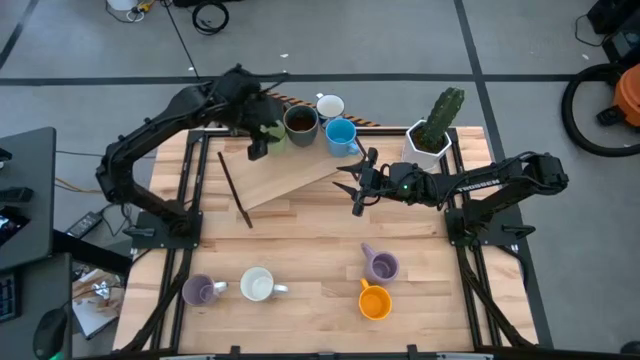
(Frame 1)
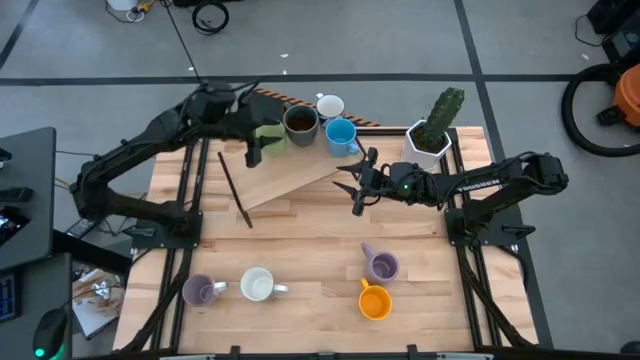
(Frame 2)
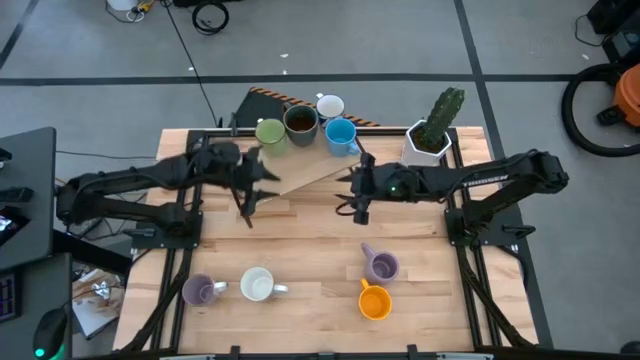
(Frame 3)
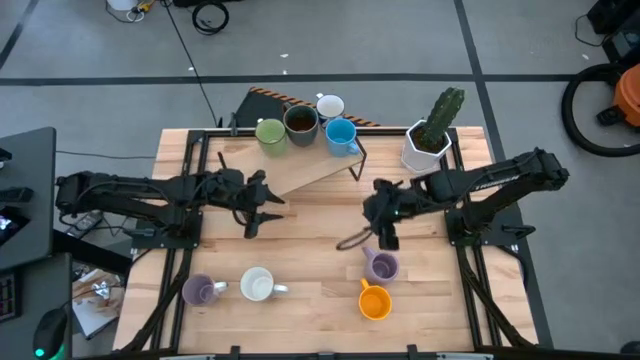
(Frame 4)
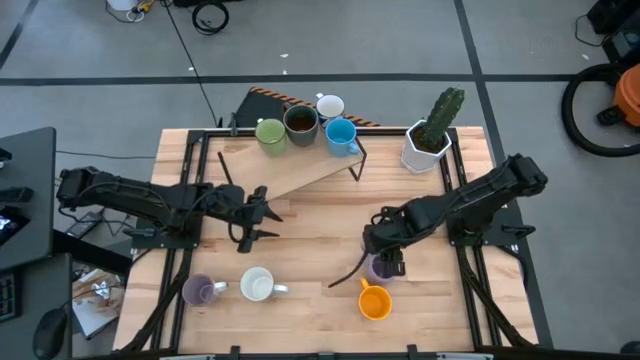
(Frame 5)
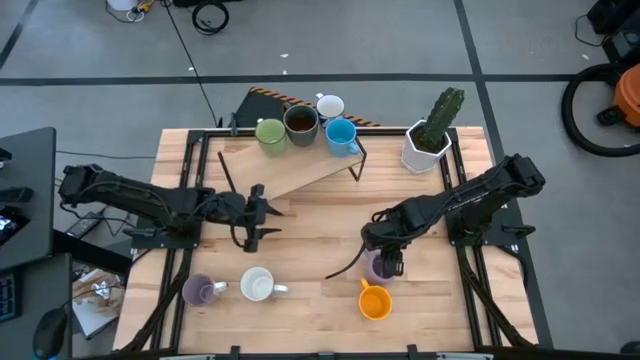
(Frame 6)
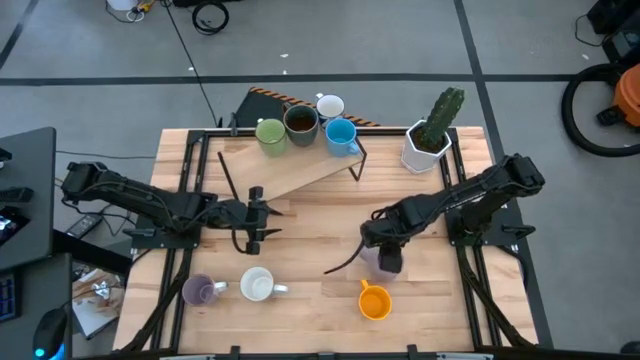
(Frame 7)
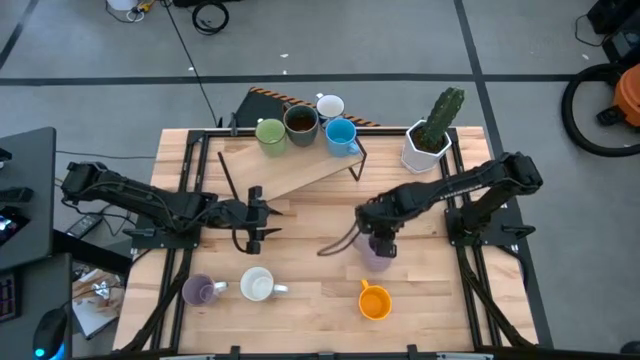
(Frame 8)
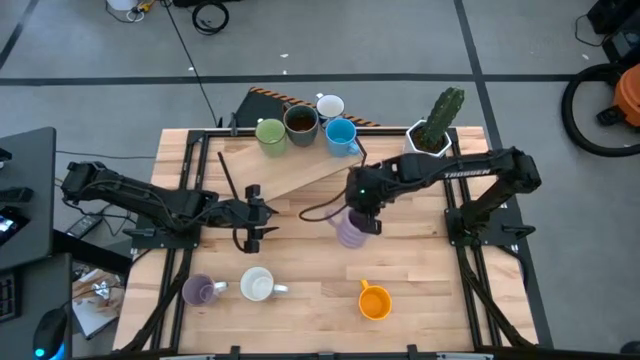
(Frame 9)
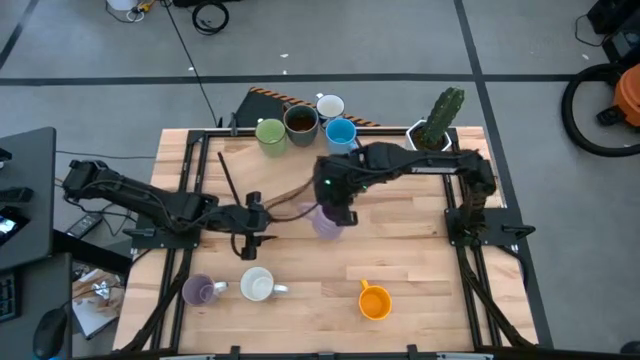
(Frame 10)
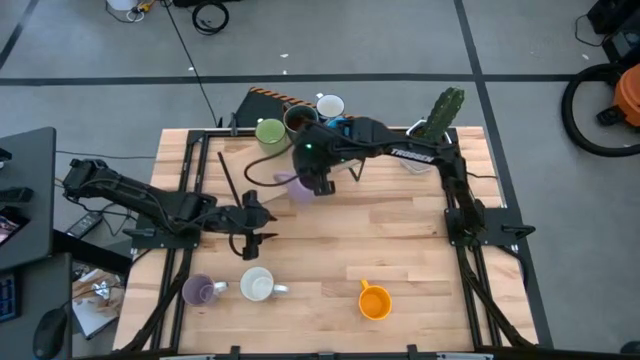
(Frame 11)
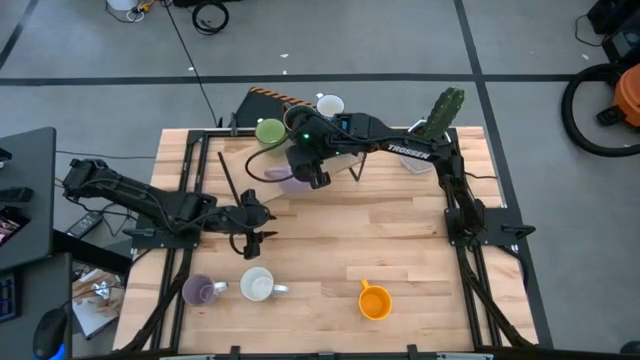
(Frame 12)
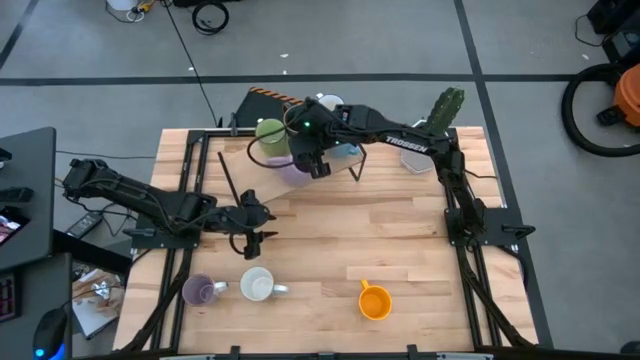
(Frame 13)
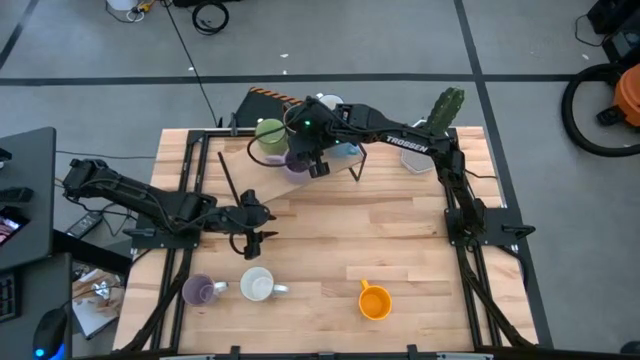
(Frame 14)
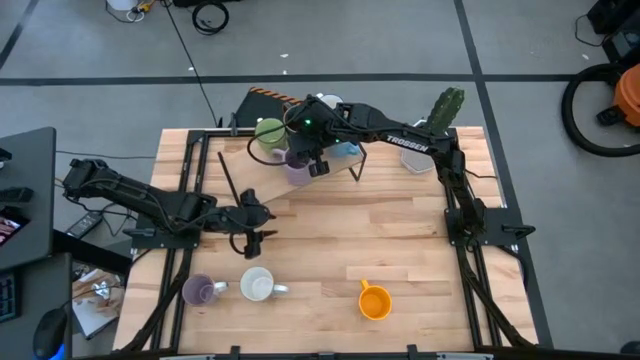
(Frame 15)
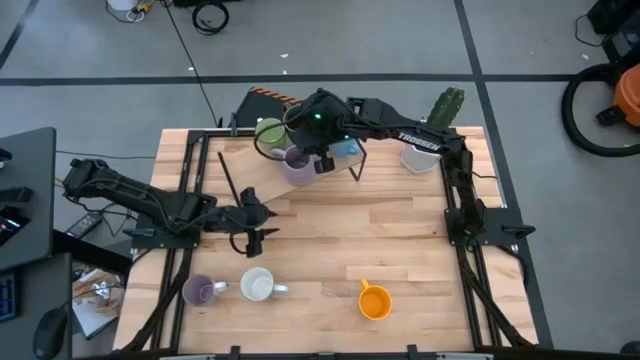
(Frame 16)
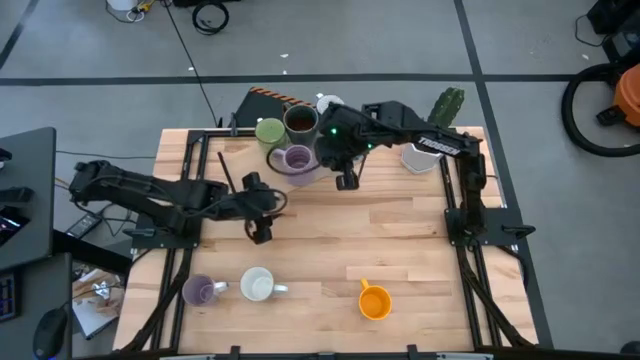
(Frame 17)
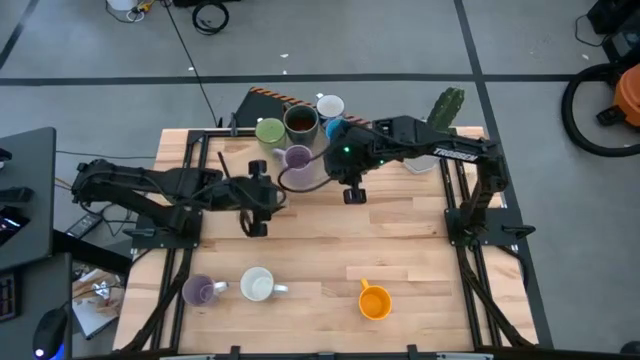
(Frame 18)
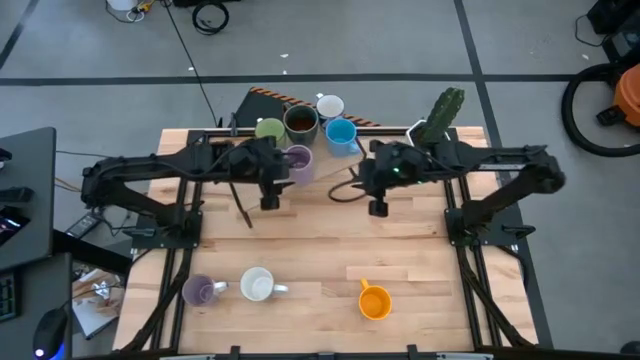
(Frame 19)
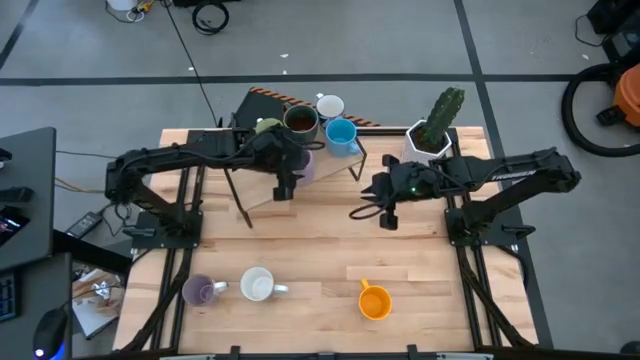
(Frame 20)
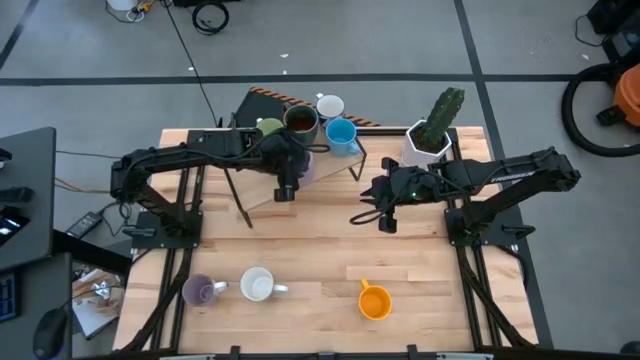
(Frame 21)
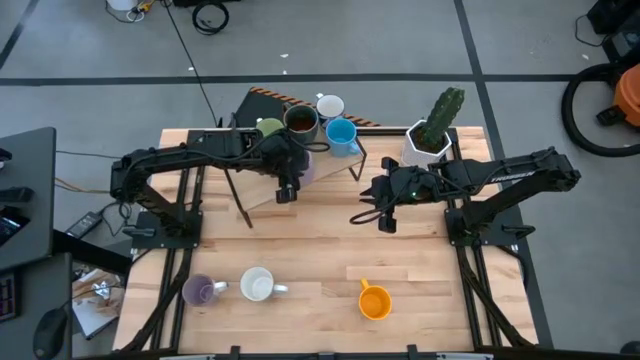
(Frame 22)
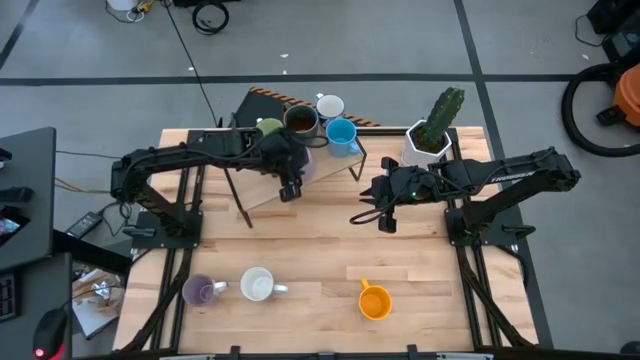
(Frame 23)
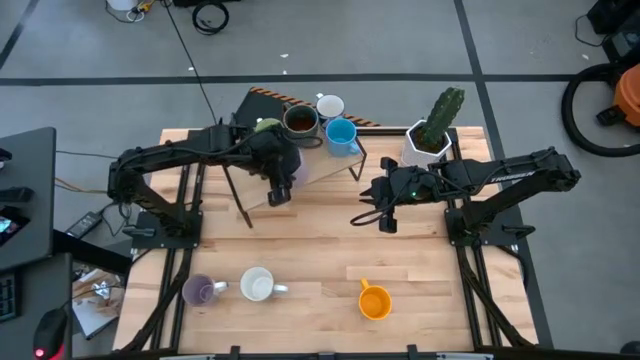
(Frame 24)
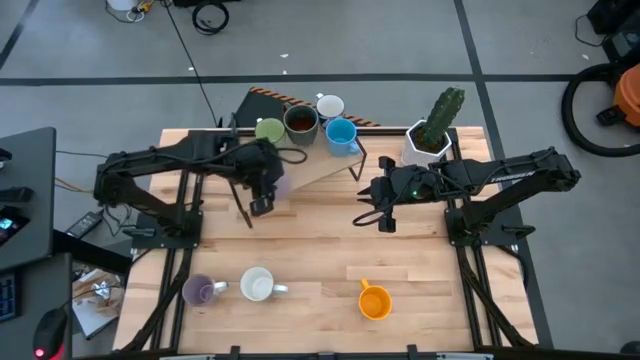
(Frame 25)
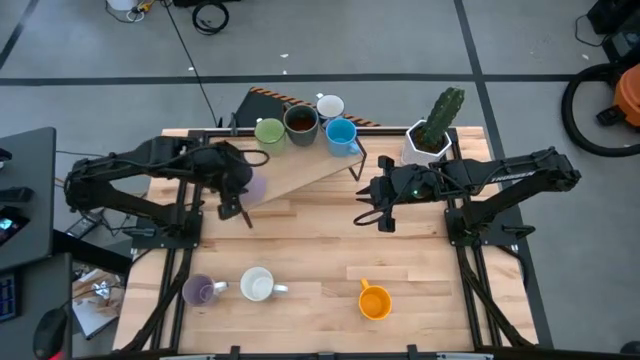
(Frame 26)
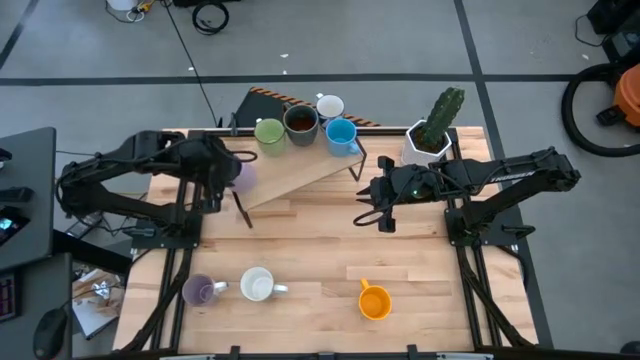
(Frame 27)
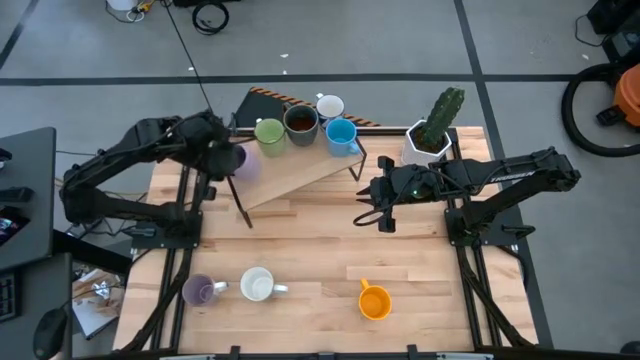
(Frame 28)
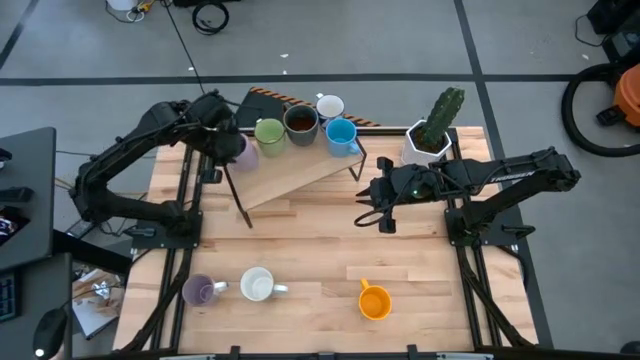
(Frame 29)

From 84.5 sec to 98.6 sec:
Task: Place coffee mugs
Put the purple mug on the shelf

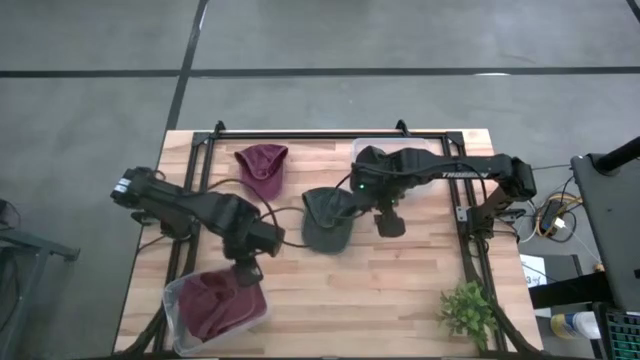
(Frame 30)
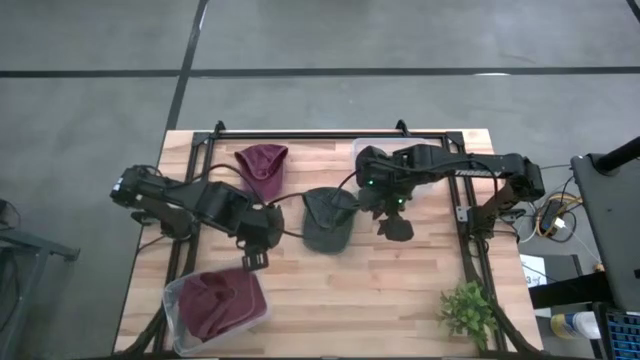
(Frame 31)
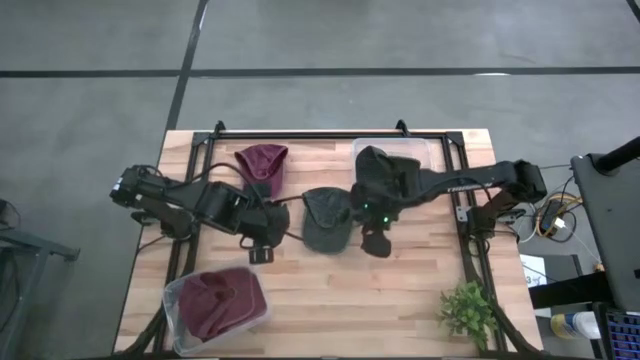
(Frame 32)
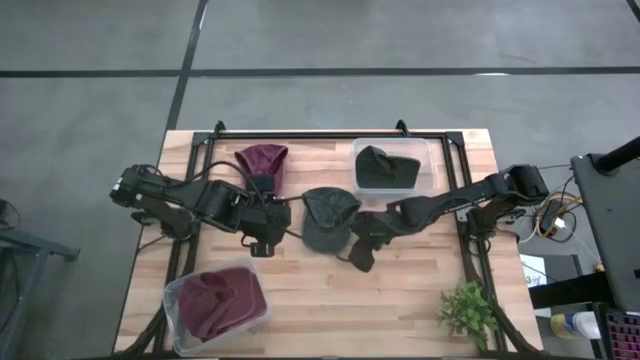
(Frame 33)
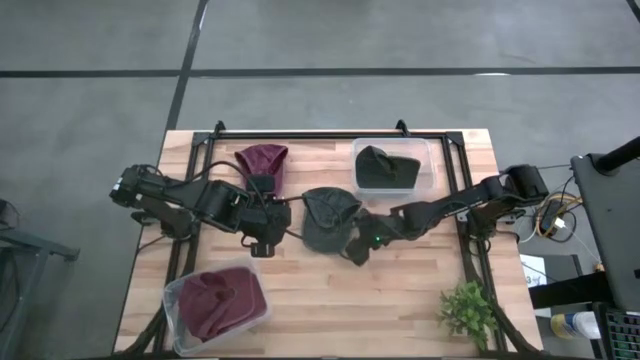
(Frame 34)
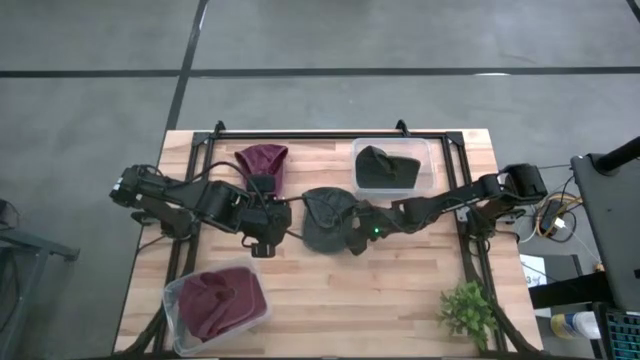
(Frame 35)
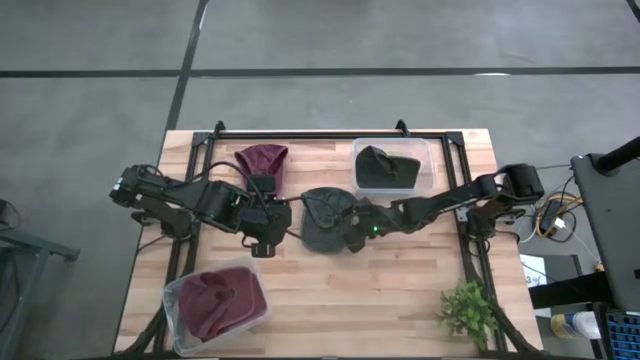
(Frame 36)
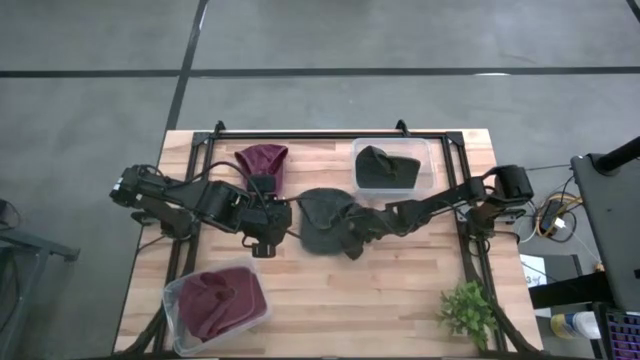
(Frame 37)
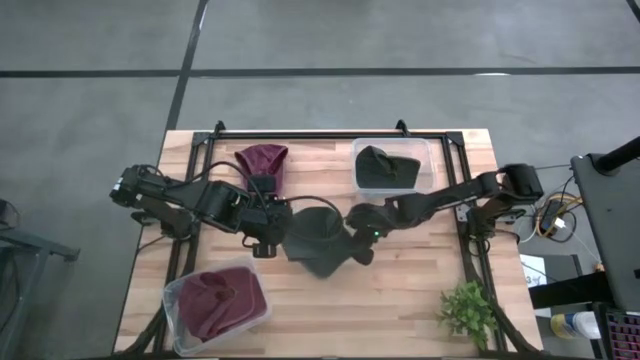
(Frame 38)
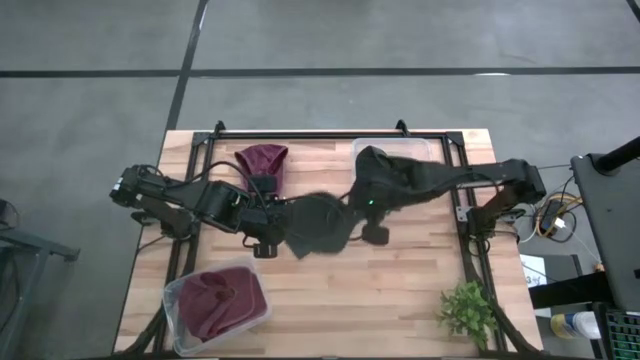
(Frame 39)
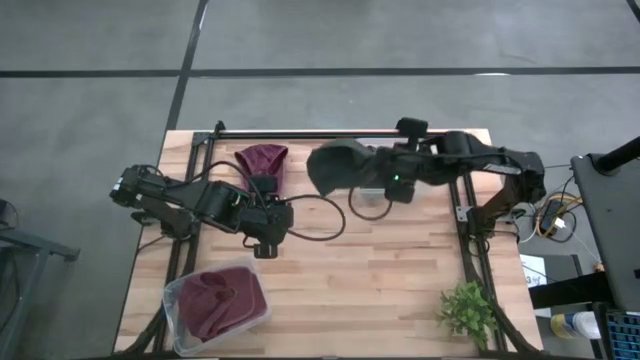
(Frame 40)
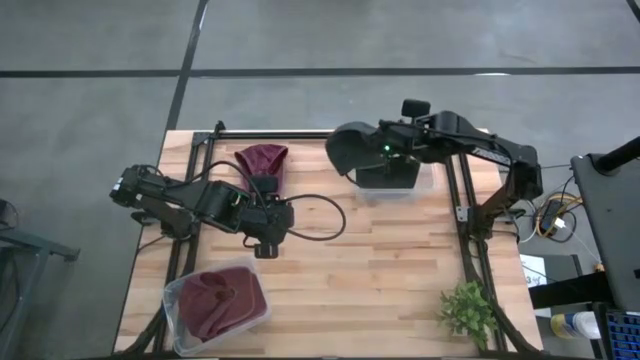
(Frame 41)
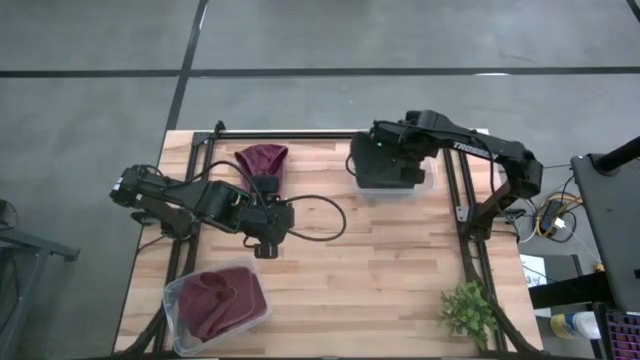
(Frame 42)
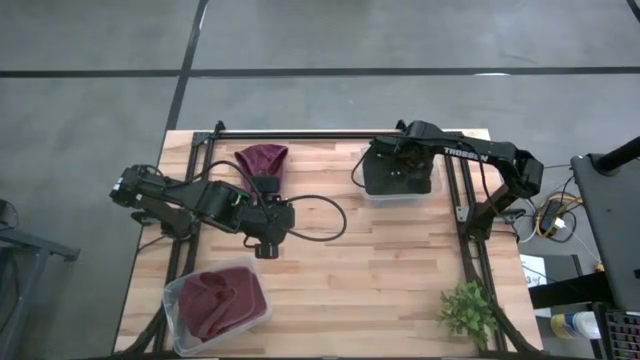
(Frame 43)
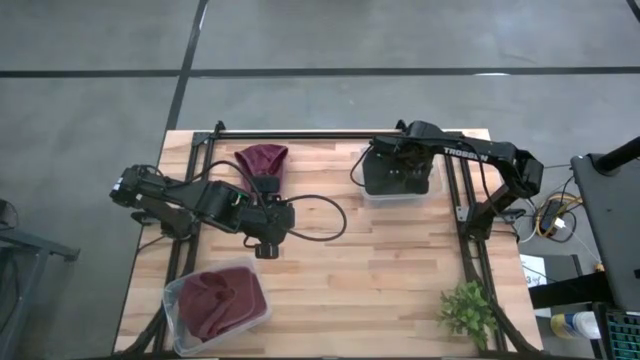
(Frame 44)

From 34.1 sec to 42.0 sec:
Task: Pick & Place hat
Put the gray cap into the top transparent bin
